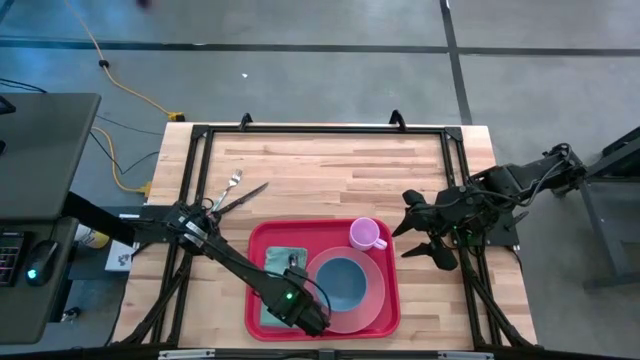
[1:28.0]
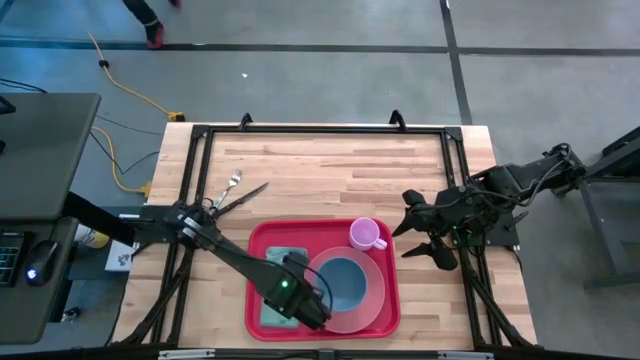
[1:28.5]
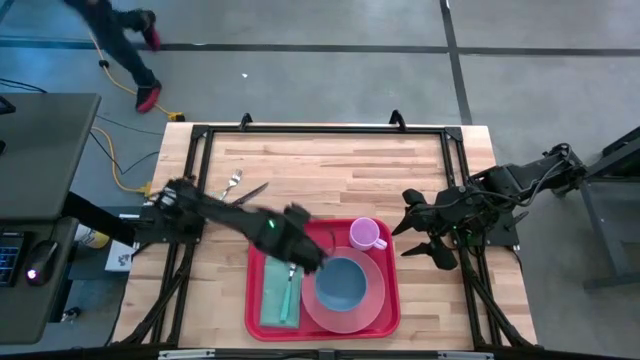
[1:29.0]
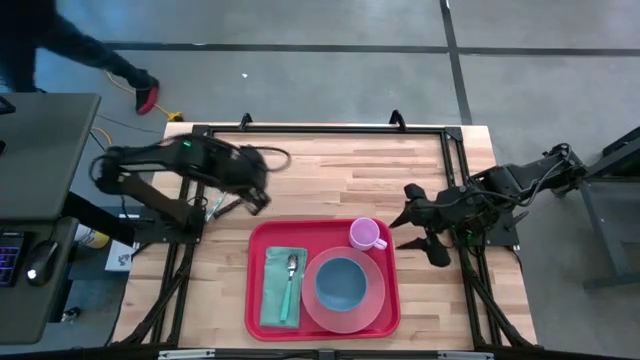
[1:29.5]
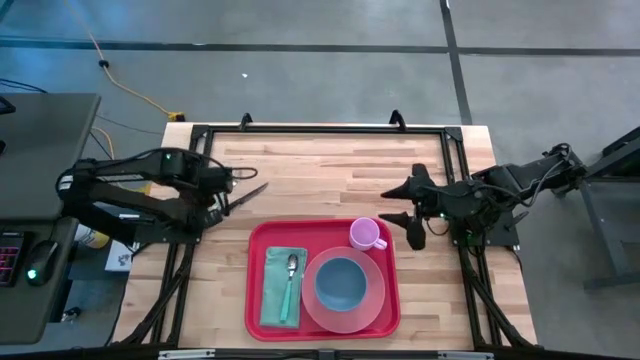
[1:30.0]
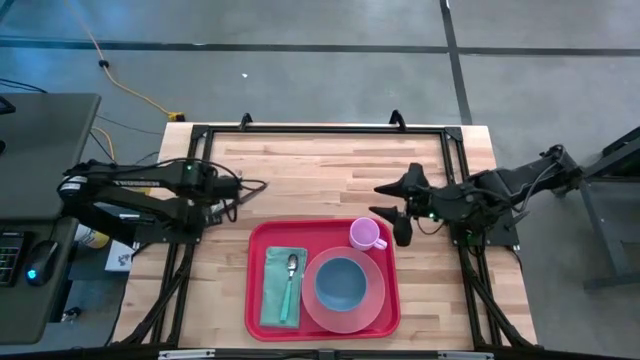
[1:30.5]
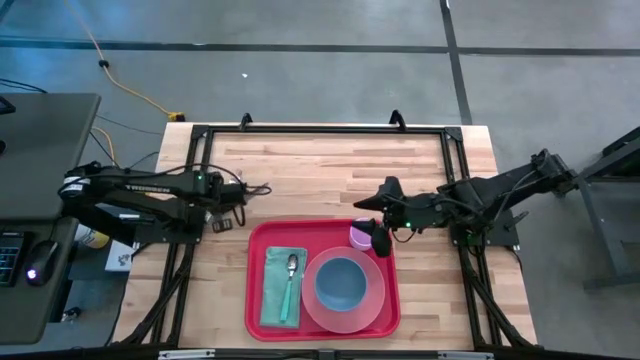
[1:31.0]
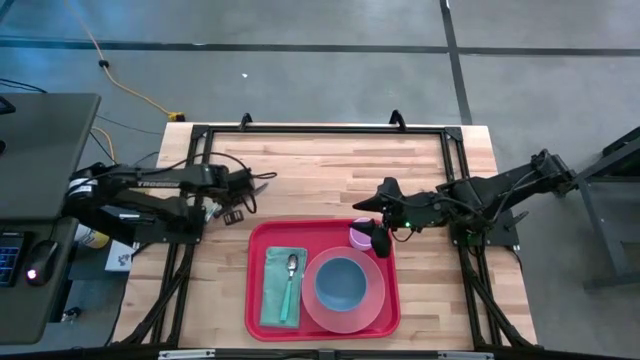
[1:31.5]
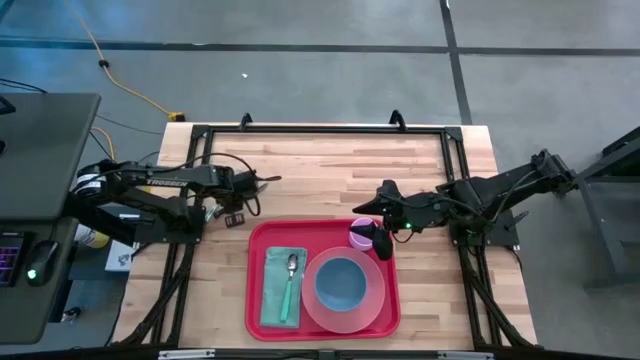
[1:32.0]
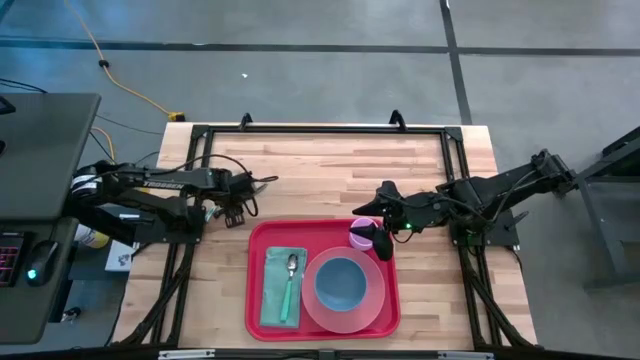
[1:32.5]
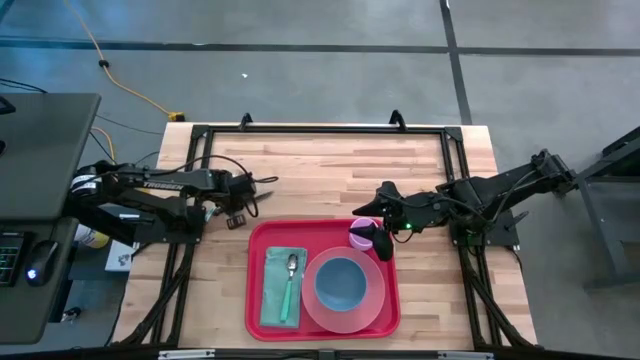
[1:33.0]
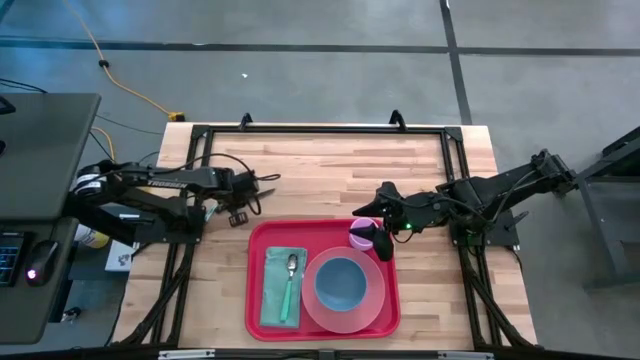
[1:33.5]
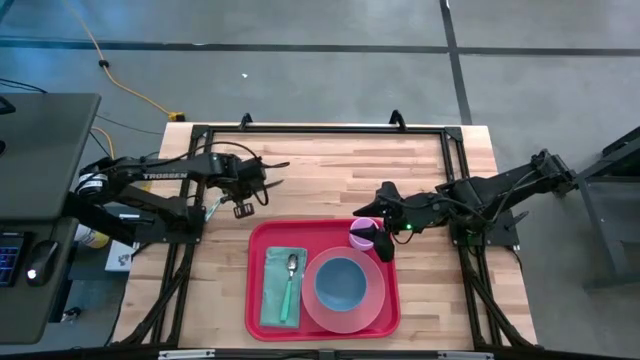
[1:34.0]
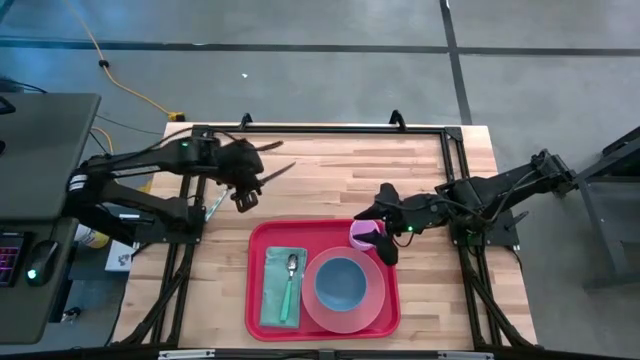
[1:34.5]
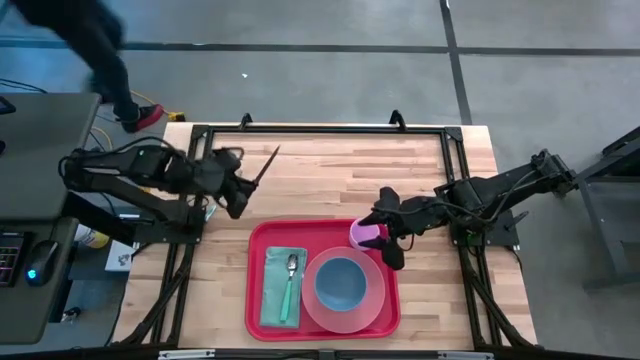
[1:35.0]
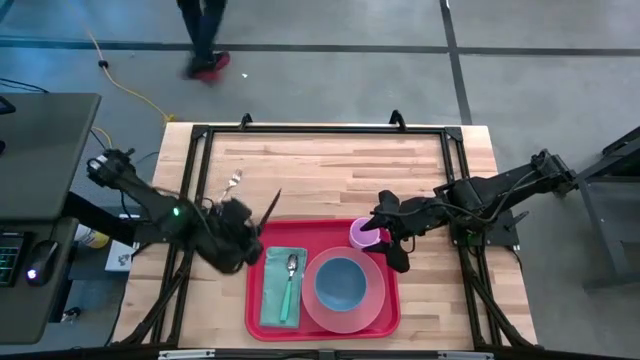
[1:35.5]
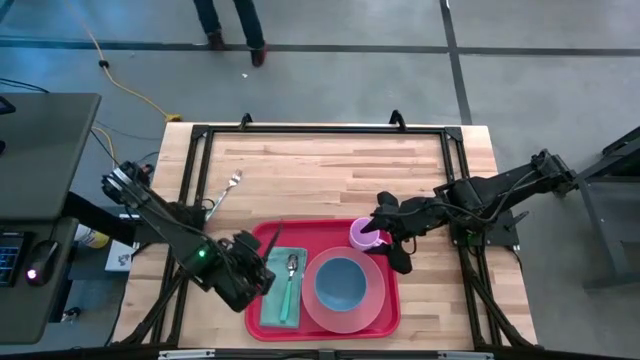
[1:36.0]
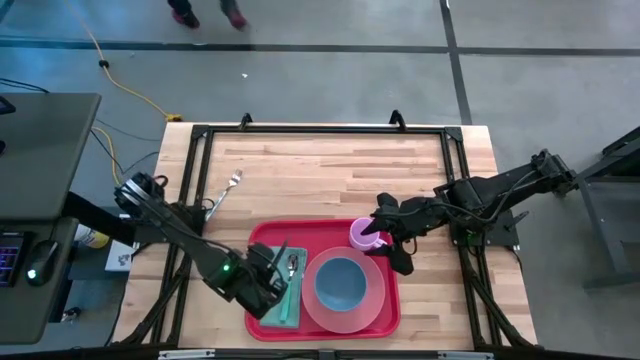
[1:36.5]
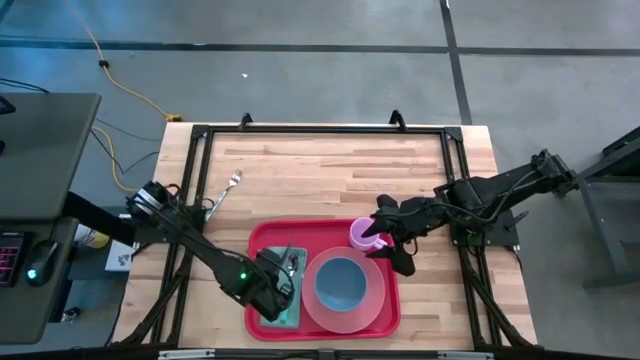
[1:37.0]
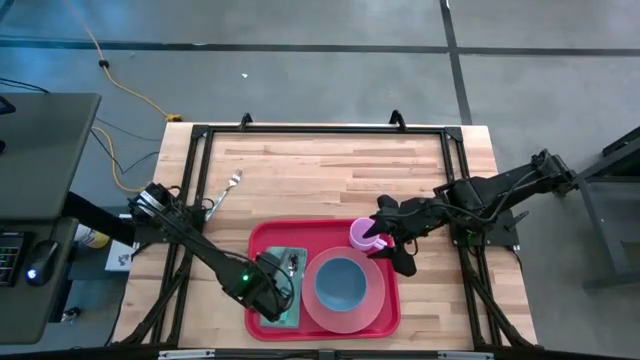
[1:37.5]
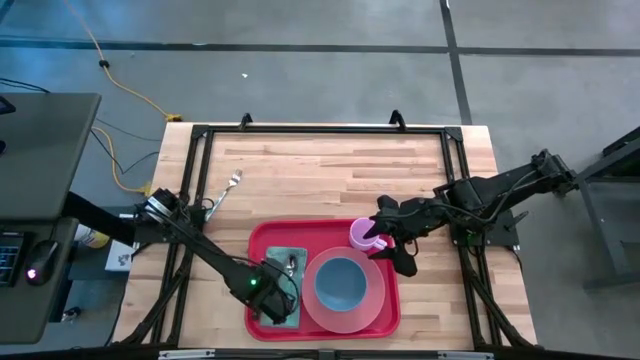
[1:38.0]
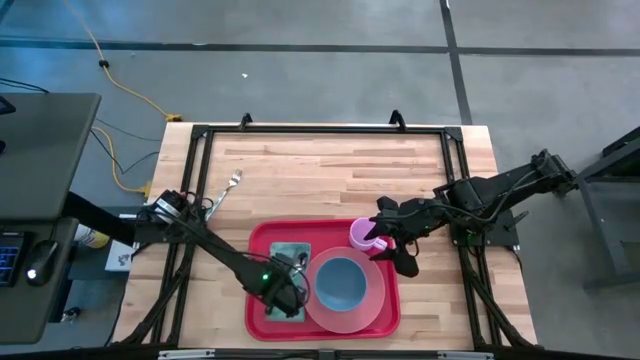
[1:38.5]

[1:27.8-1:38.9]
Task: Set up tray
Put the black table knife on top of the light blue table napkin to the left side of the blue spoon

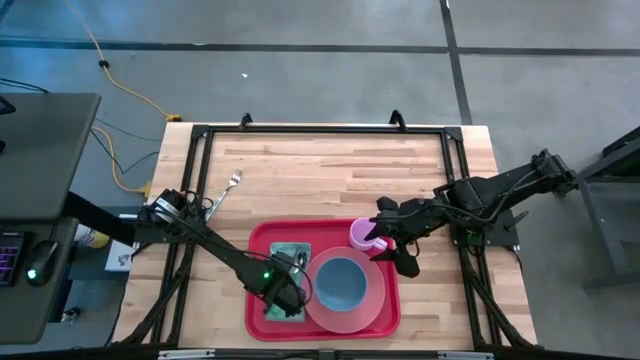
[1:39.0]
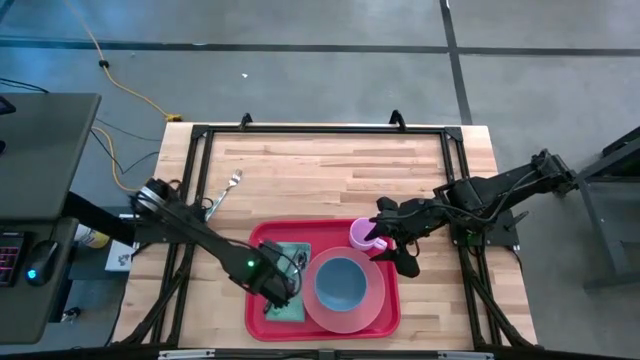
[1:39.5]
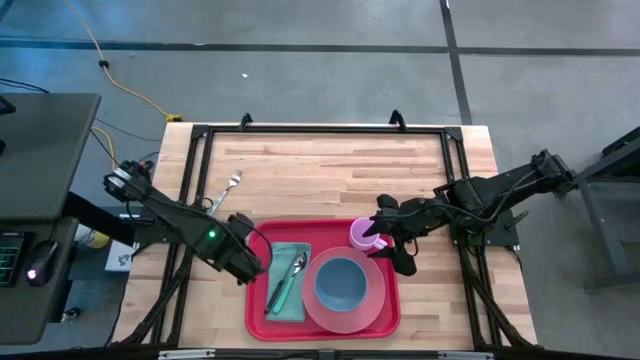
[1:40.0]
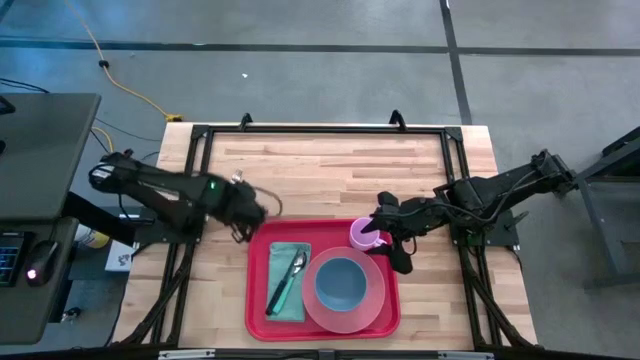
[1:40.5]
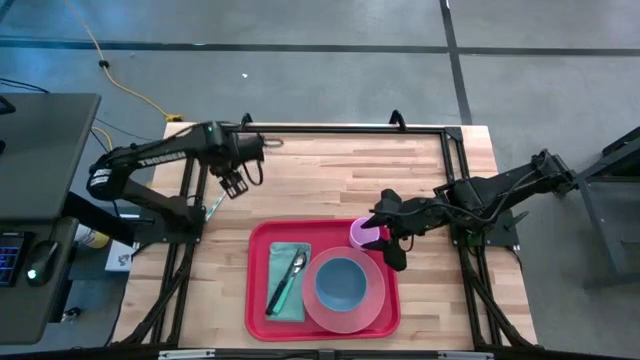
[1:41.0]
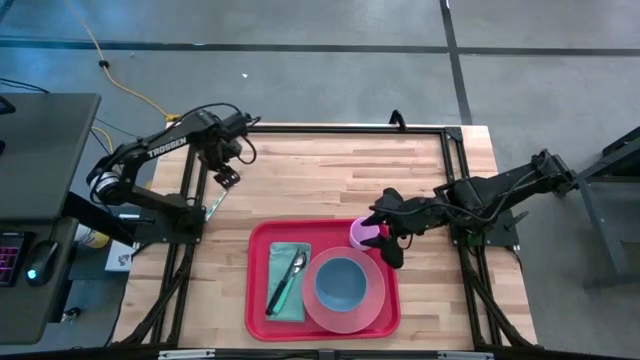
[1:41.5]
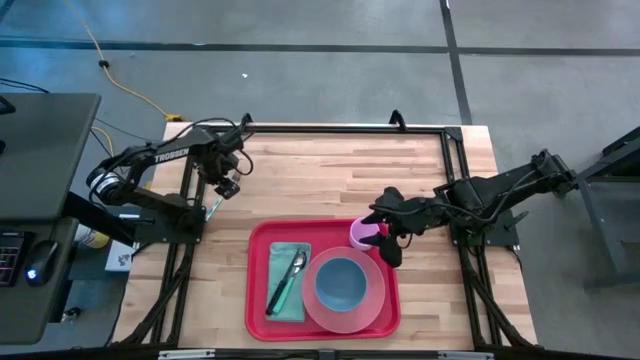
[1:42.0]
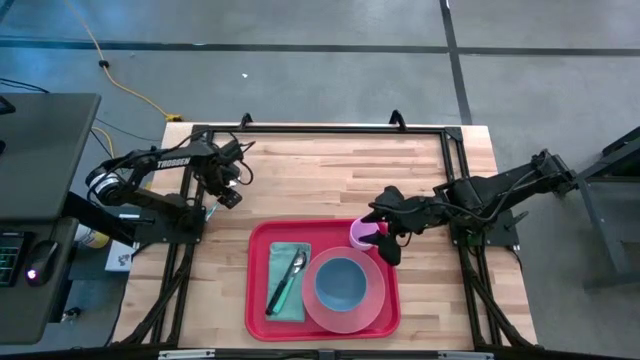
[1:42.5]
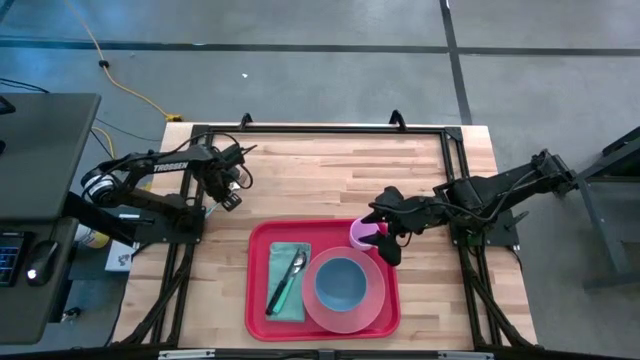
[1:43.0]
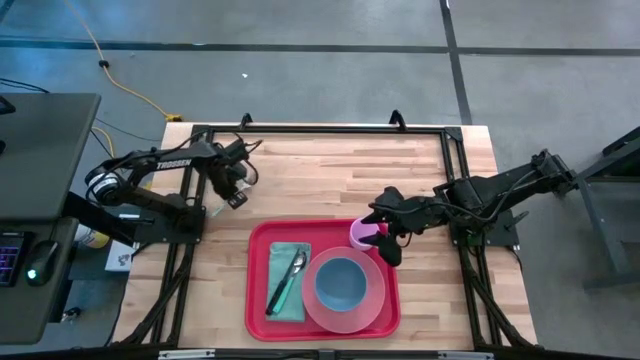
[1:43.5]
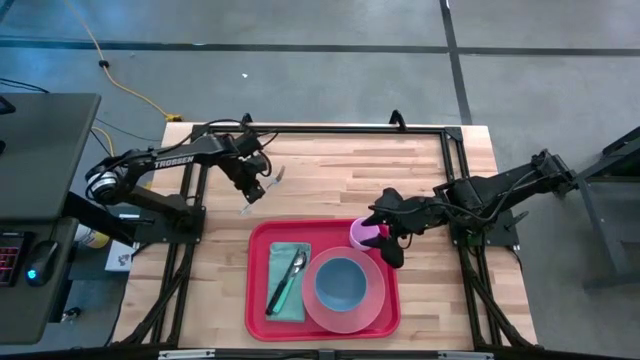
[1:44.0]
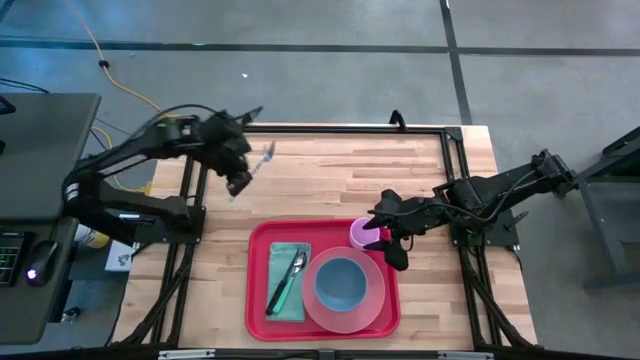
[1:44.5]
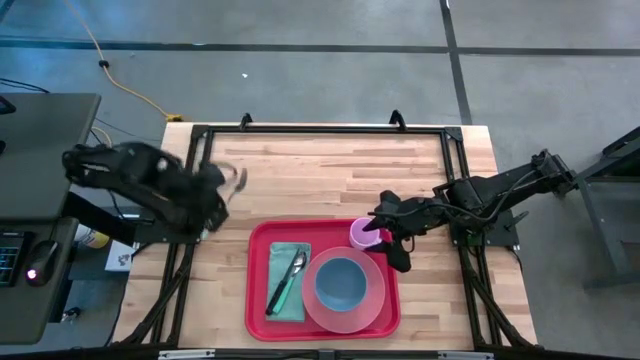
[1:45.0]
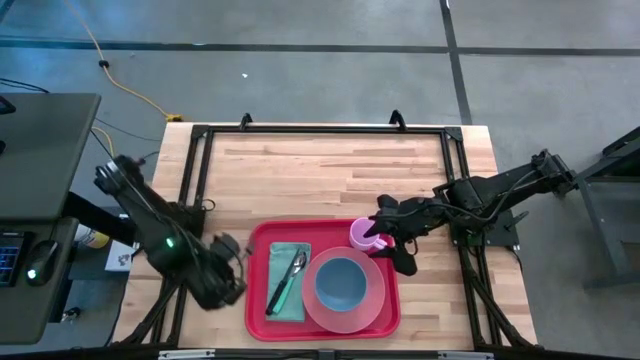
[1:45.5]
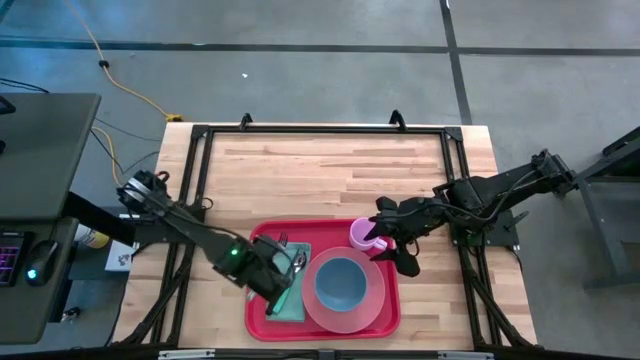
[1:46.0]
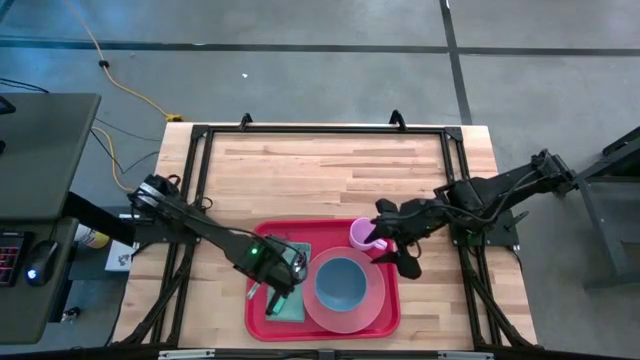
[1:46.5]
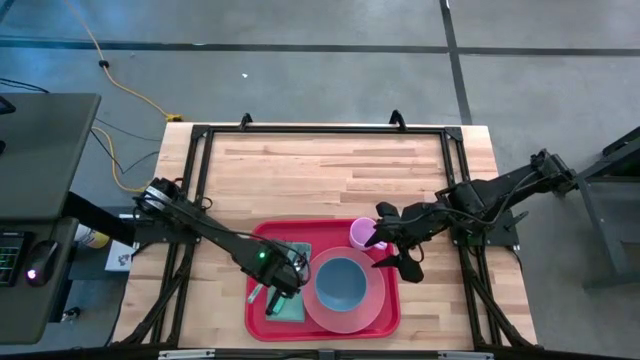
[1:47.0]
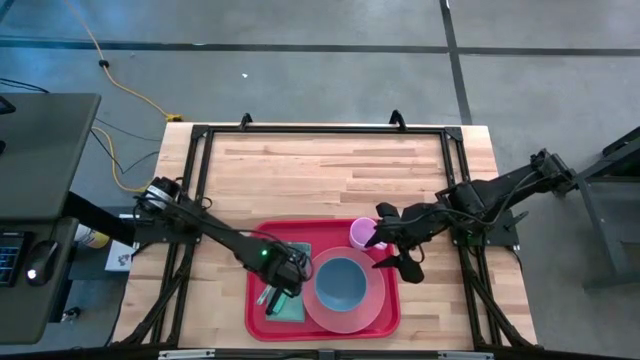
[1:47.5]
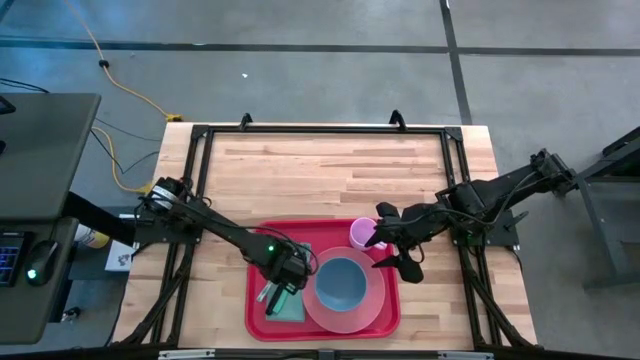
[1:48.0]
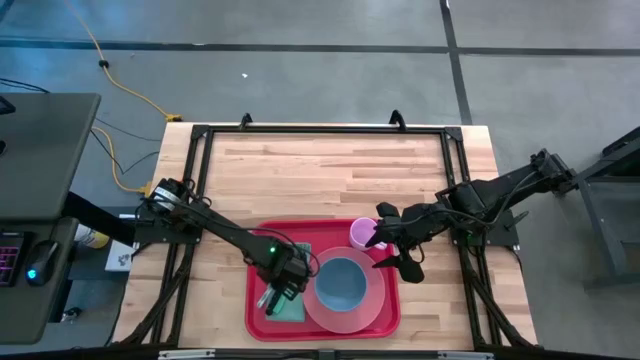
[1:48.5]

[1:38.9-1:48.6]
Put the white fork on top of the light blue table napkin to the left side of the black table knife
